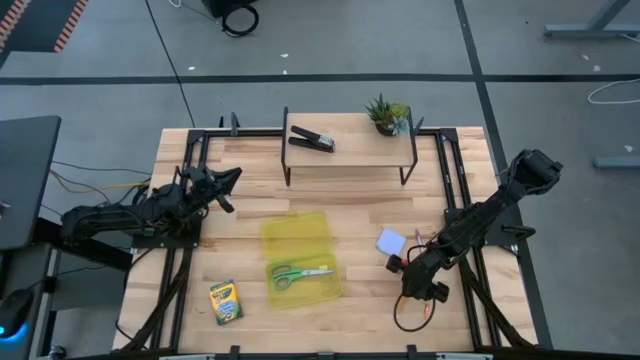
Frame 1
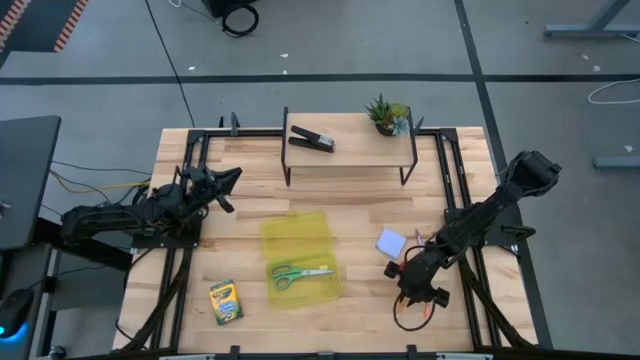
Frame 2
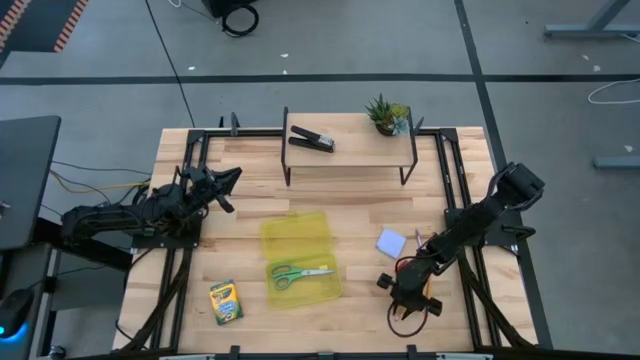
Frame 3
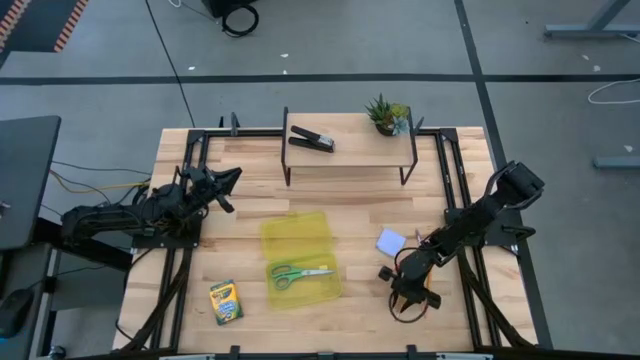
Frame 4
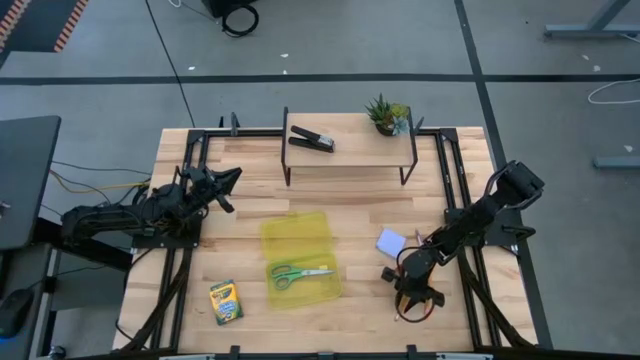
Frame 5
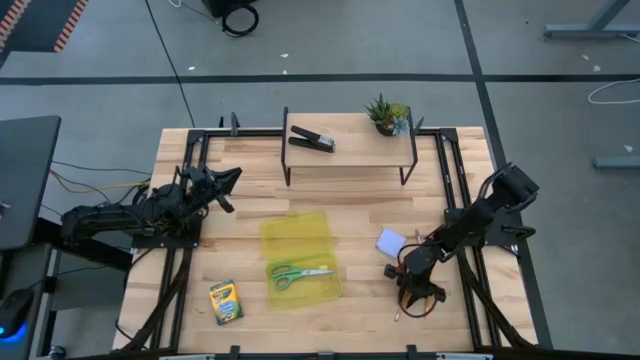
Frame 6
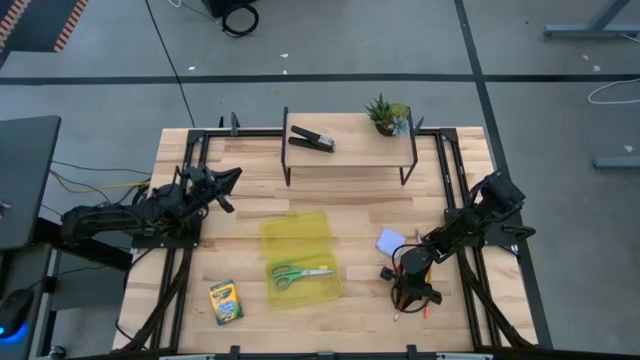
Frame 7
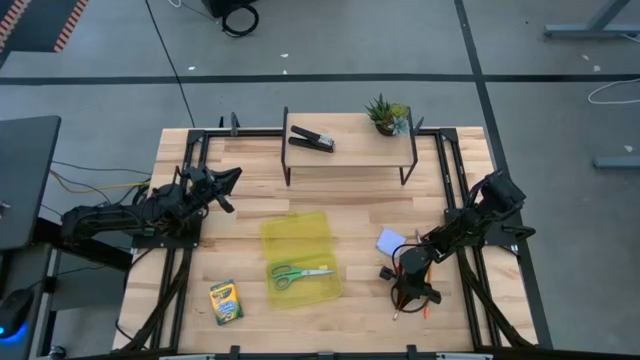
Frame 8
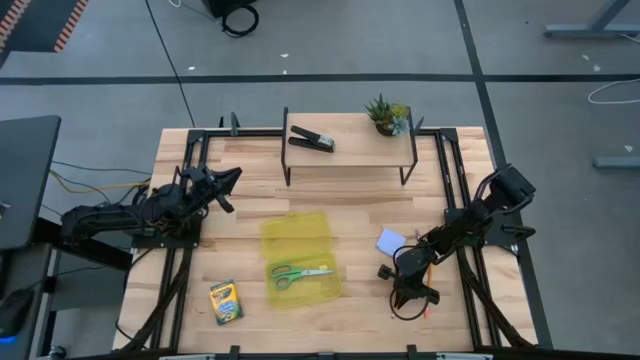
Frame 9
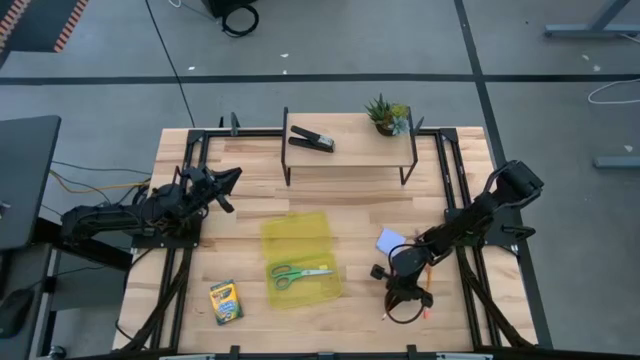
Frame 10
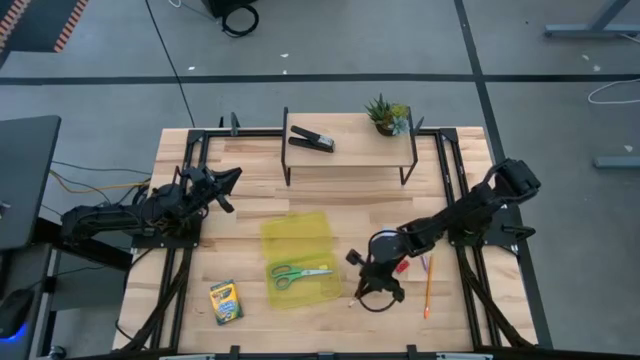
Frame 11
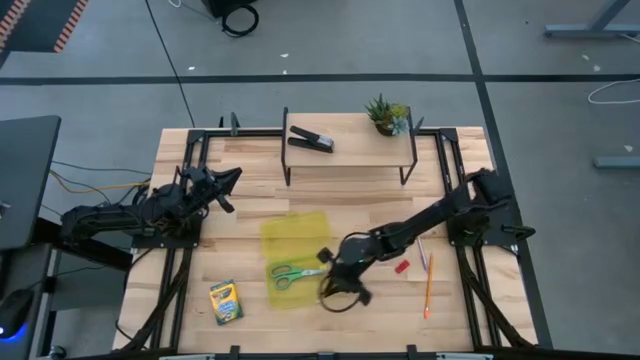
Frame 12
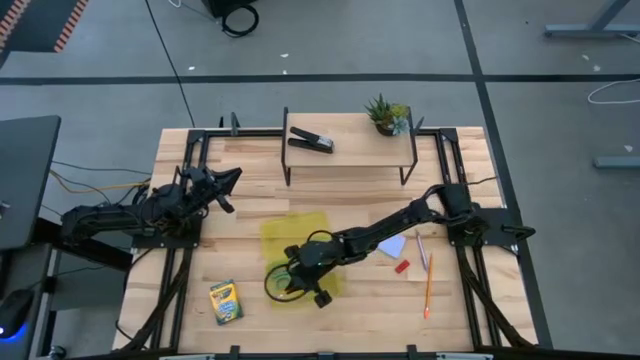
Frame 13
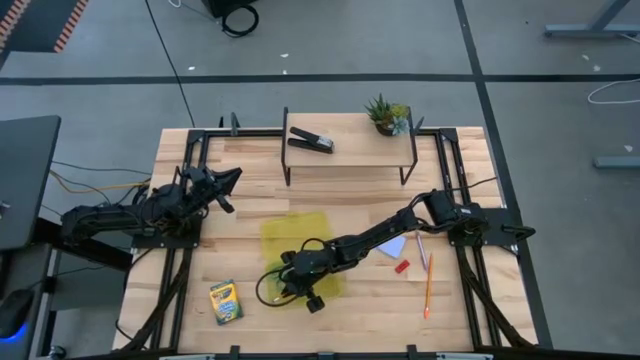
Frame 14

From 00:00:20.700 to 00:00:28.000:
Task: Pack school essentials
Put the orange pencil into the yellow supply box

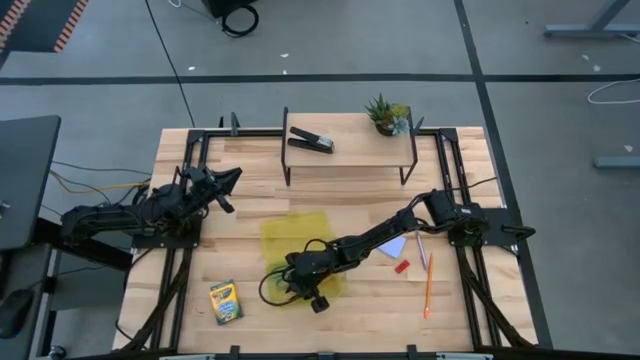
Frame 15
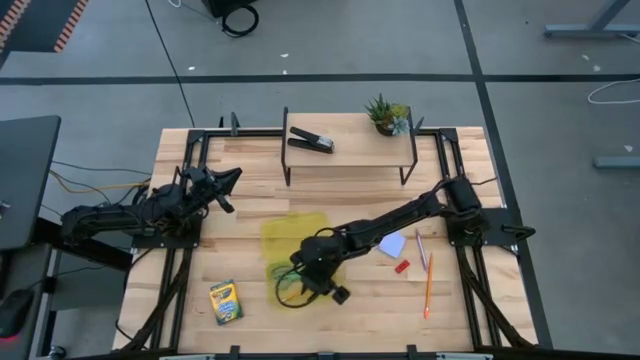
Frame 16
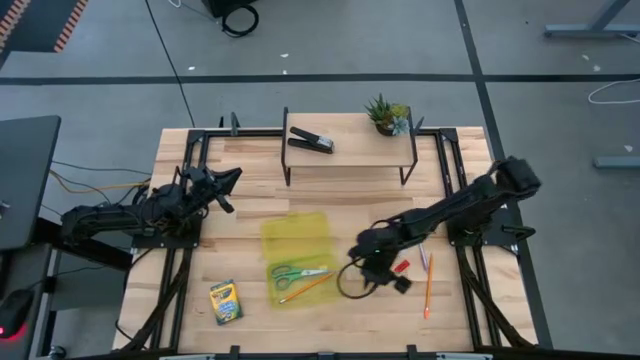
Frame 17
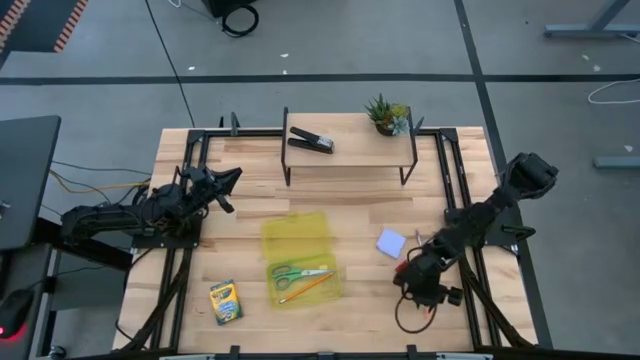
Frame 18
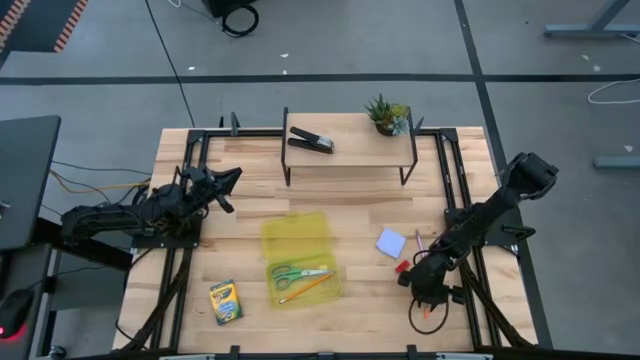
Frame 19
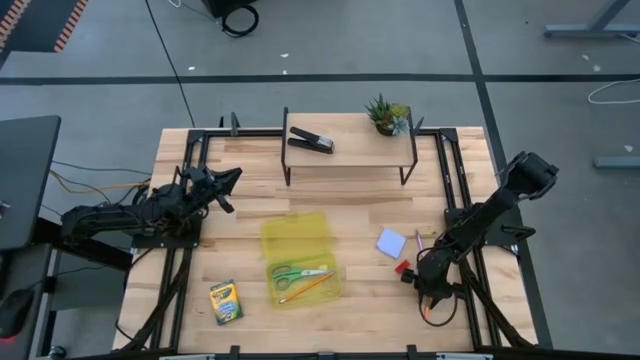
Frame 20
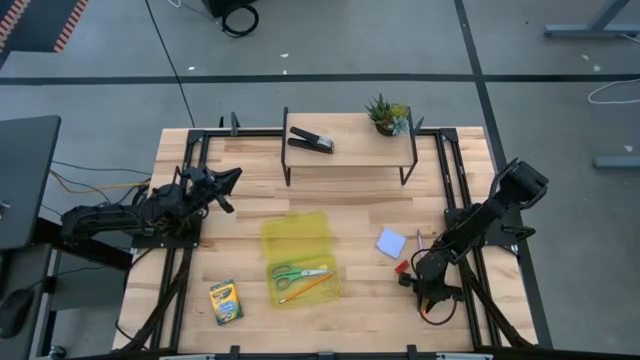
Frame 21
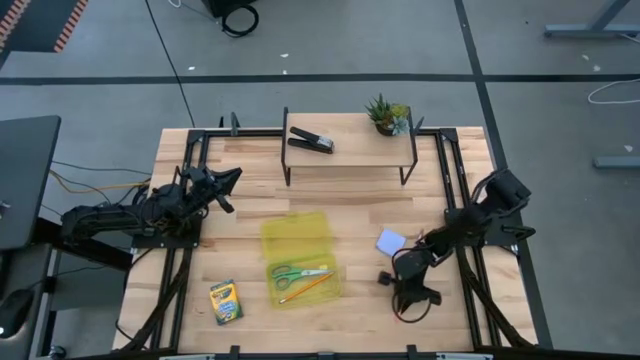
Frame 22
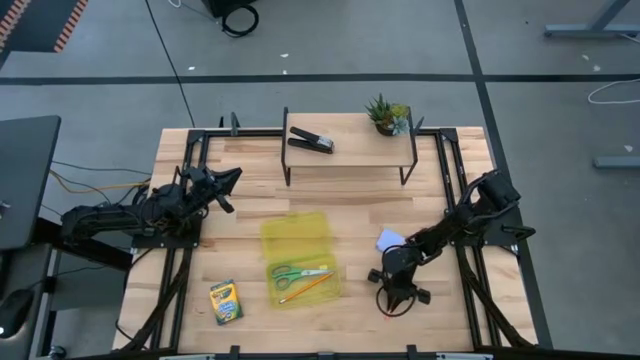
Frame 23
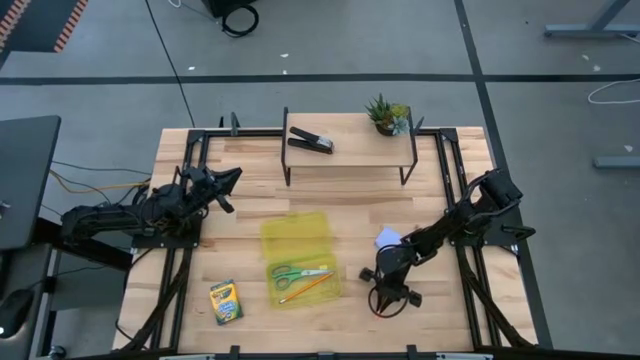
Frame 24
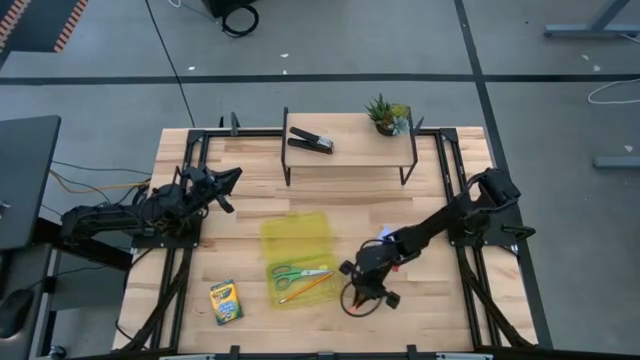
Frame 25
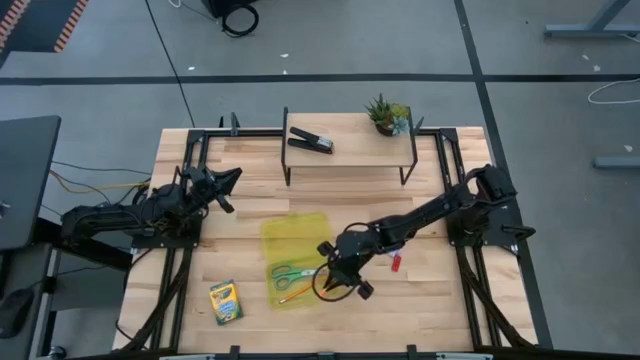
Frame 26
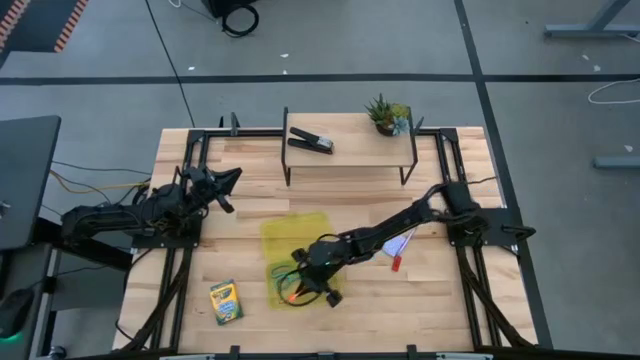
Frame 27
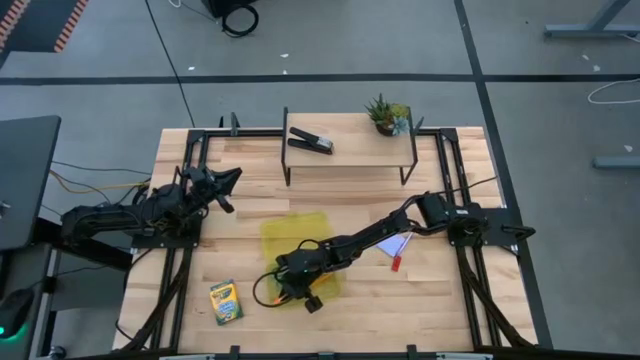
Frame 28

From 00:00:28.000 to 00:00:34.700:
Put the orange pencil into the yellow supply box

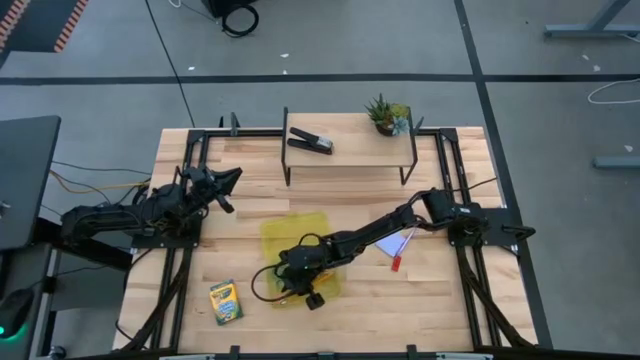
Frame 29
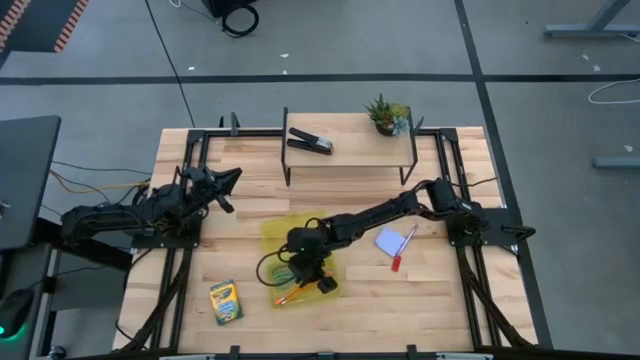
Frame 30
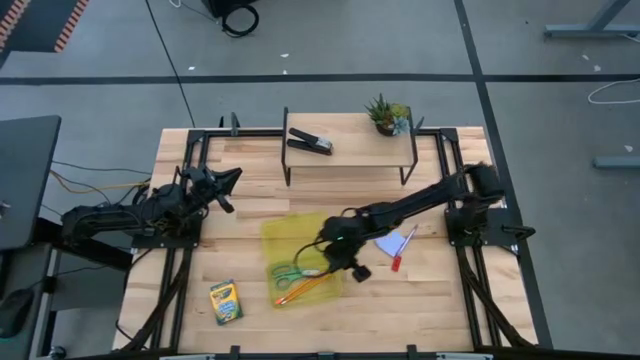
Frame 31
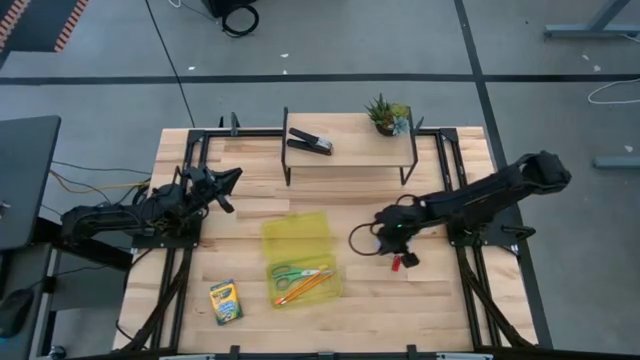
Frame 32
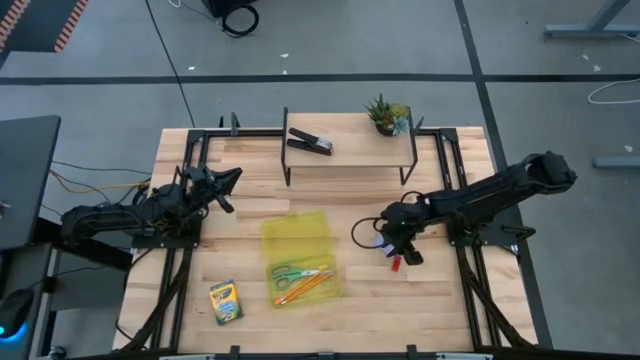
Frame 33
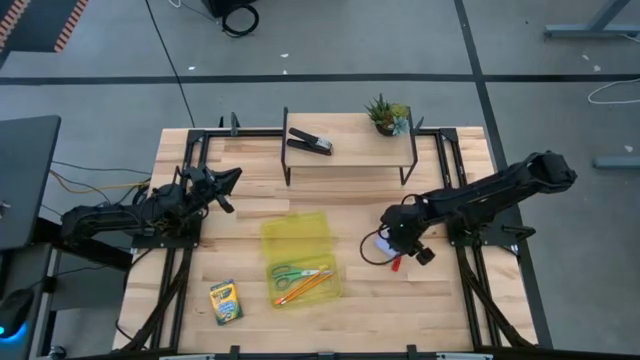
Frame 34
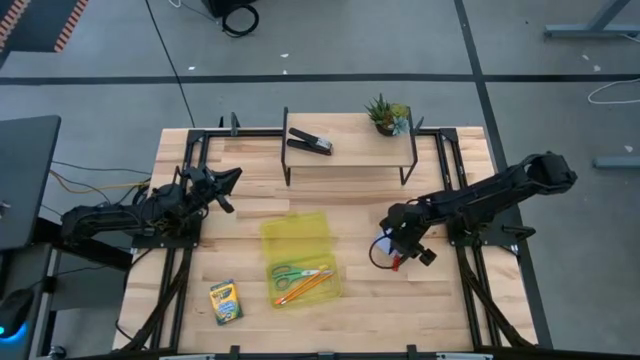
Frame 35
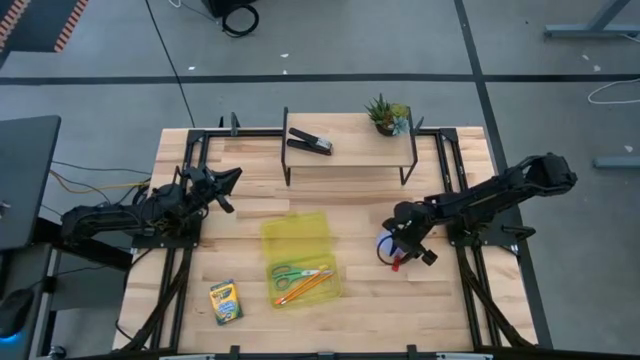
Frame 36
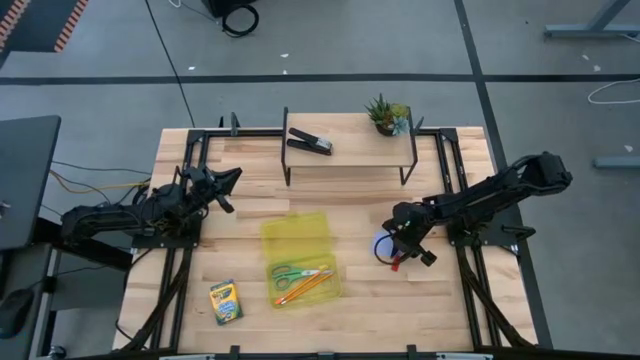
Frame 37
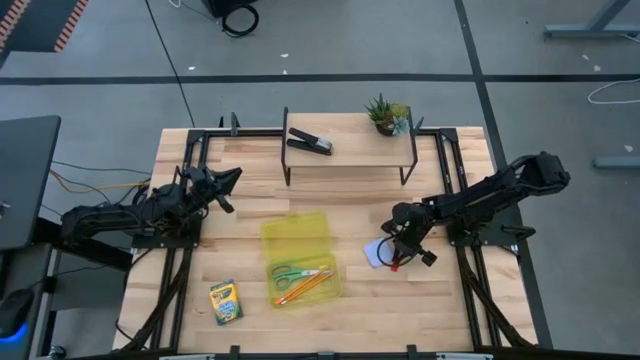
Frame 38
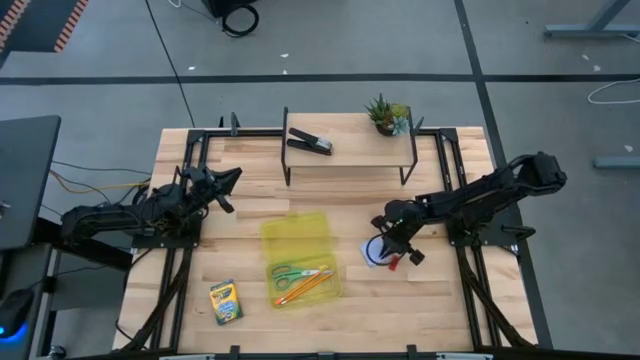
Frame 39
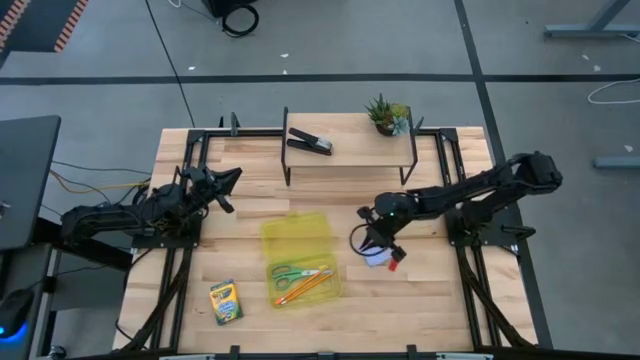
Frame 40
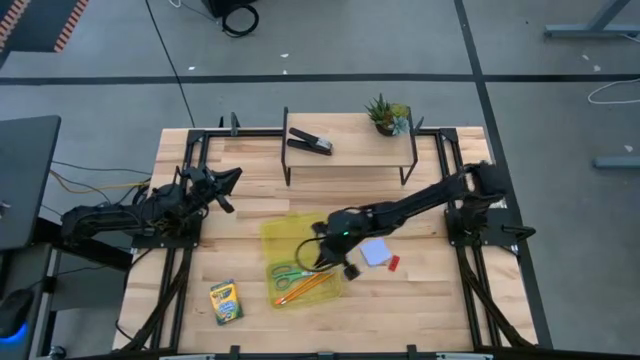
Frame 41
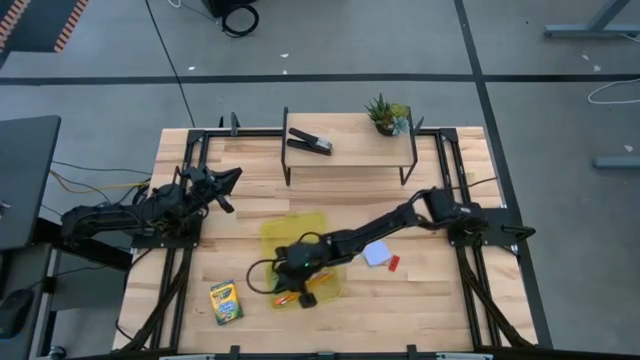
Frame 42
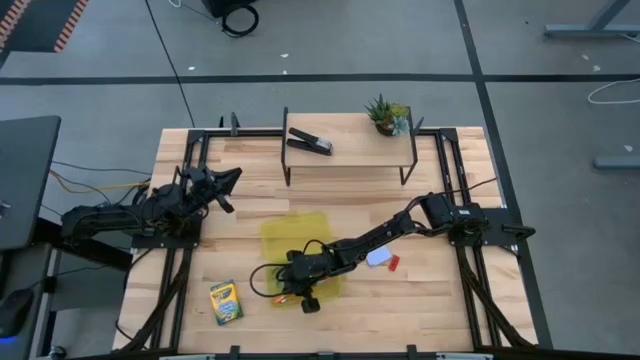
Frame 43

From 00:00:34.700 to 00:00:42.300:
Put the purple pen into the yellow supply box
